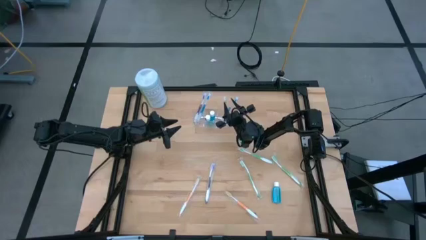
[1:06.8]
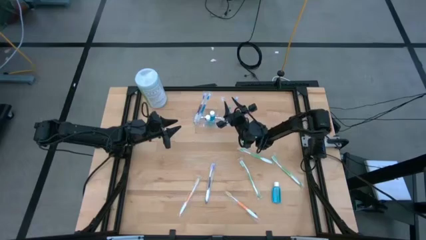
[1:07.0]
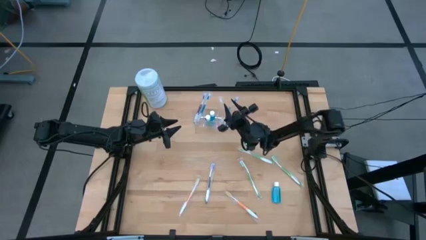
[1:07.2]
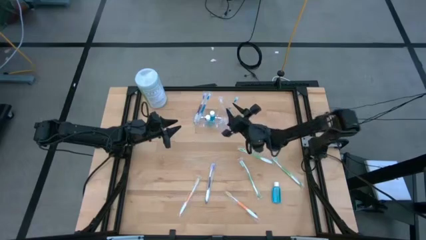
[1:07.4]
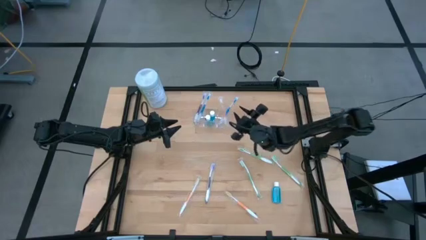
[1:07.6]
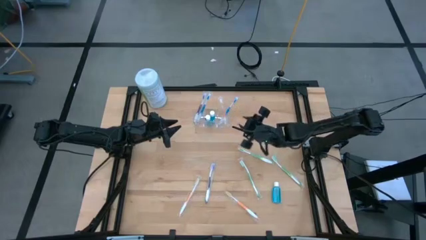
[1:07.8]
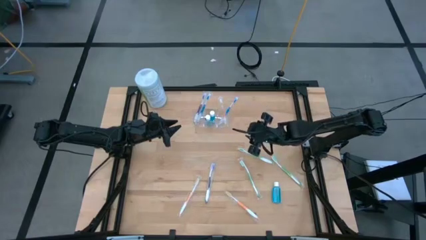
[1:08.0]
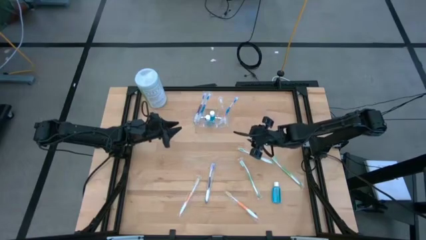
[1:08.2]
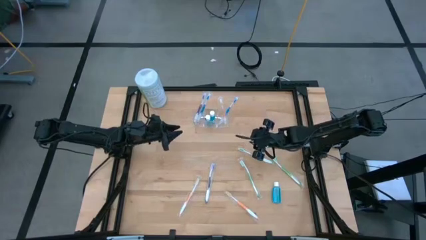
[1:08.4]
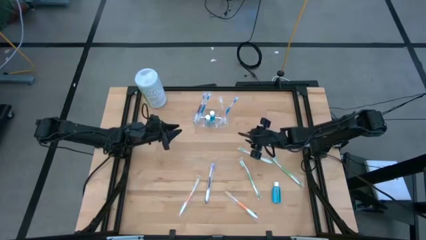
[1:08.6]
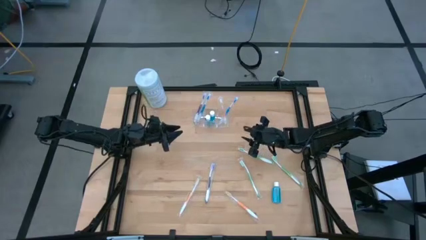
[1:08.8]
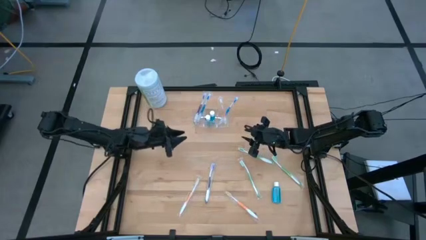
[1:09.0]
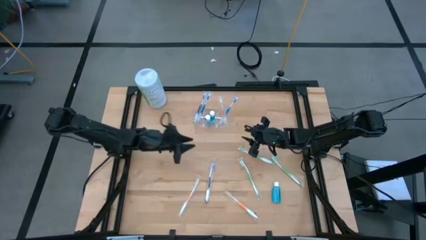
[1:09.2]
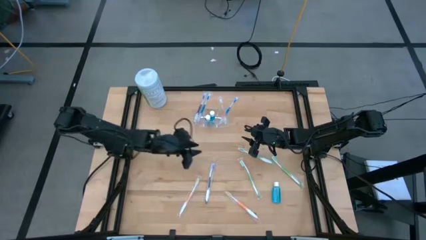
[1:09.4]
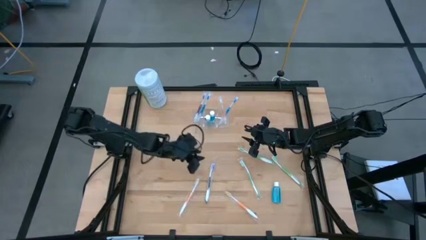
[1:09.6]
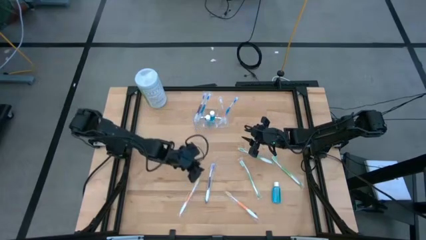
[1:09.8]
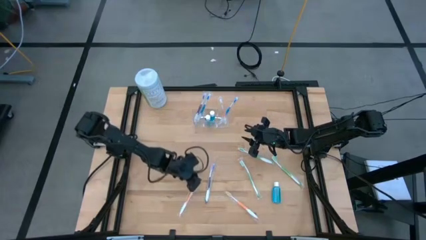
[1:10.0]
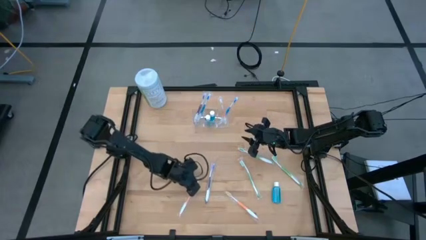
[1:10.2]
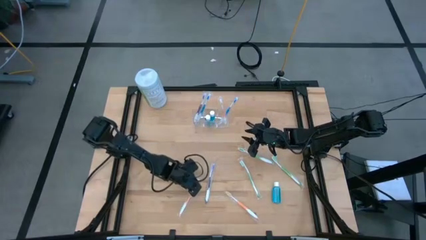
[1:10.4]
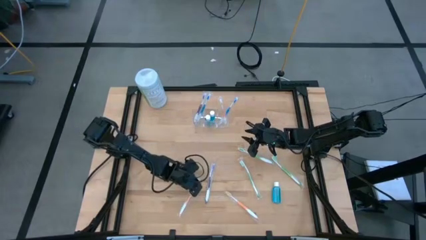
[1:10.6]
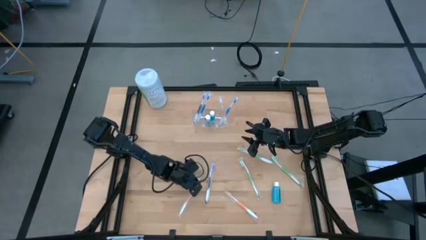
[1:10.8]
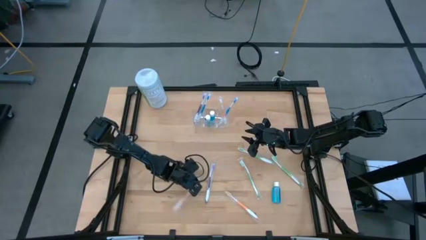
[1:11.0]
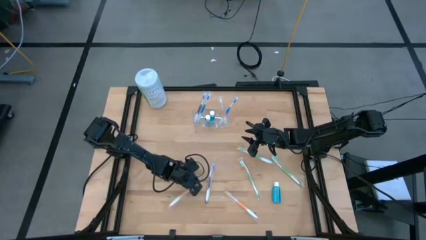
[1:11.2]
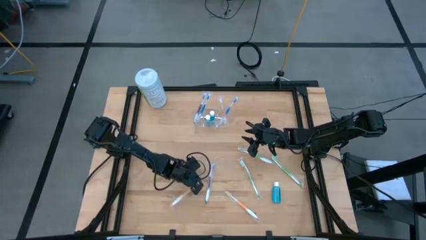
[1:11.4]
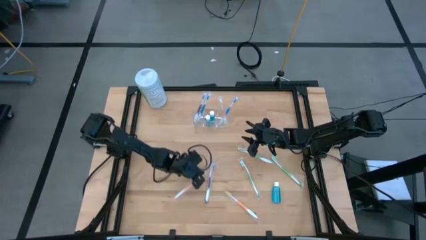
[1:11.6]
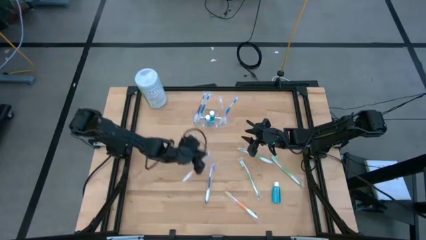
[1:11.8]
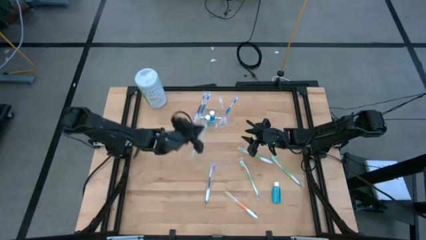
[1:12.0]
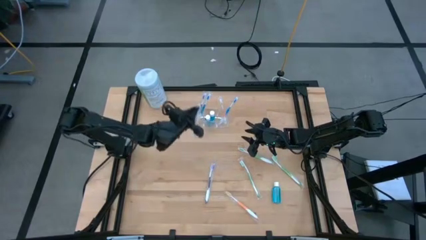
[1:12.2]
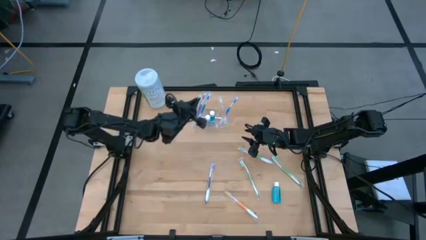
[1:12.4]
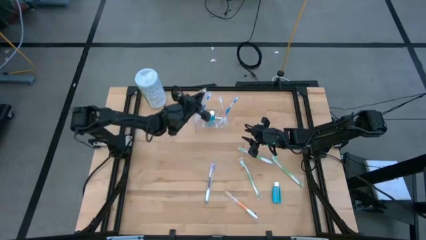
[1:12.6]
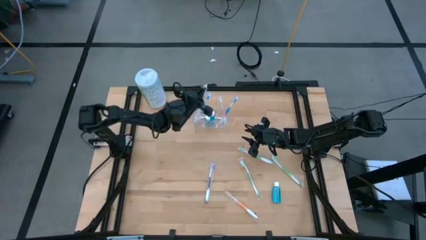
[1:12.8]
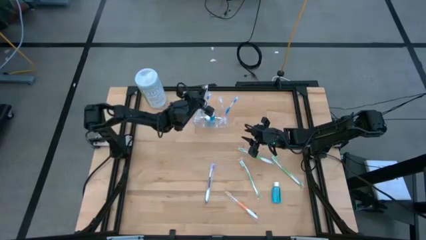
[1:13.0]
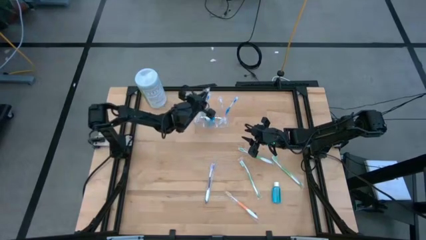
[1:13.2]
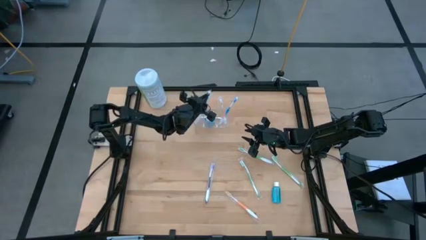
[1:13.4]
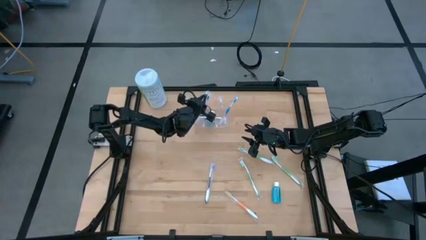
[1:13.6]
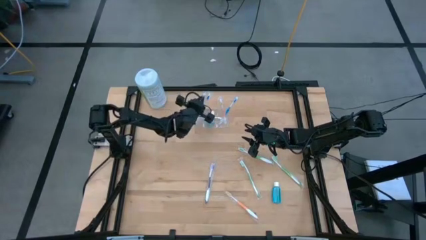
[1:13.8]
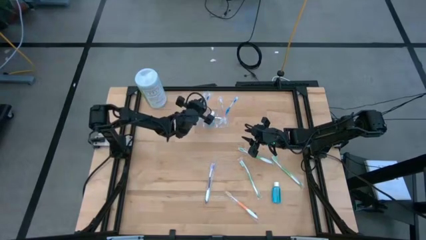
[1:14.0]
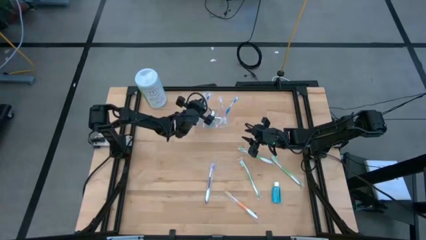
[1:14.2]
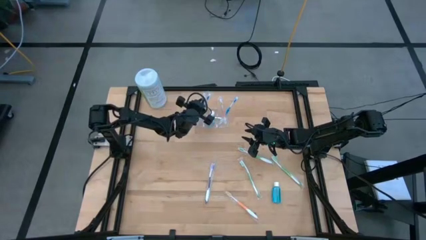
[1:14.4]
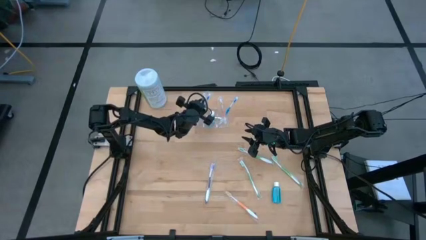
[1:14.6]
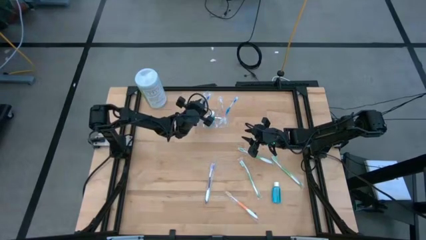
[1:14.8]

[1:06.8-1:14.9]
Task: Pick & Place toothbrushing station
Put the left orange toothbrush into the transparent organizer

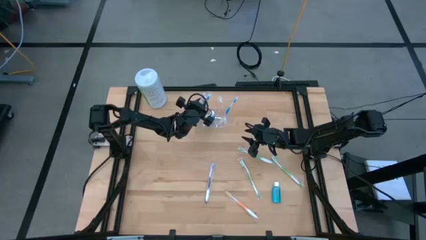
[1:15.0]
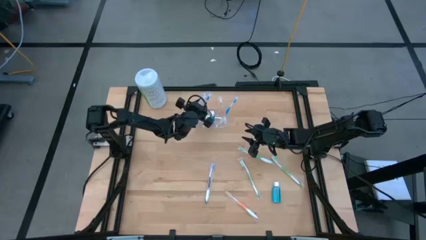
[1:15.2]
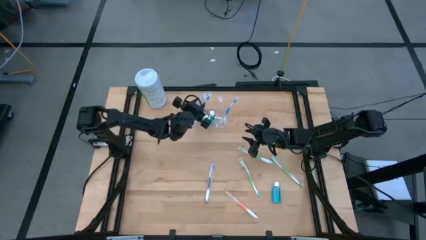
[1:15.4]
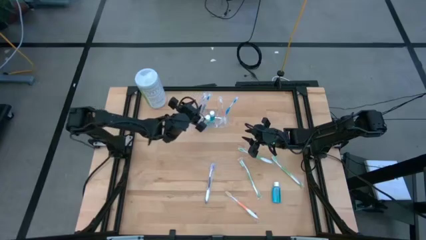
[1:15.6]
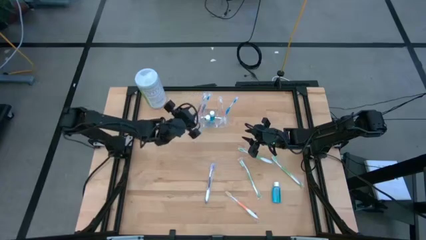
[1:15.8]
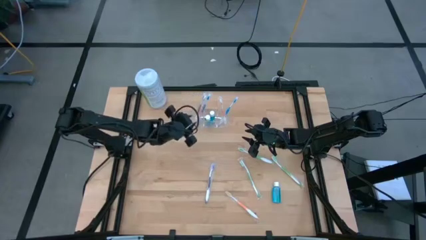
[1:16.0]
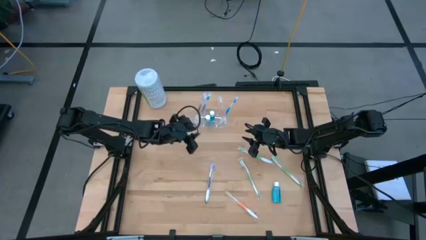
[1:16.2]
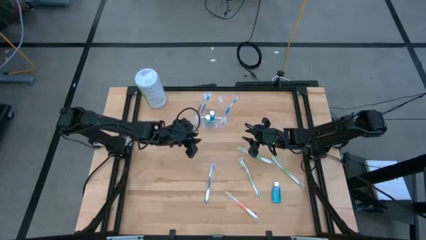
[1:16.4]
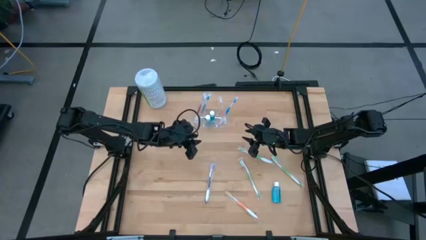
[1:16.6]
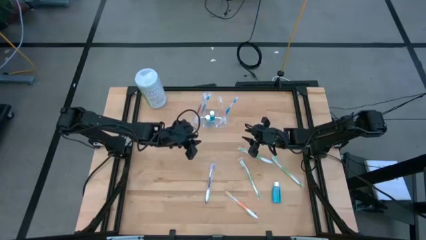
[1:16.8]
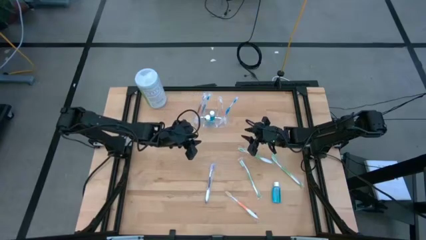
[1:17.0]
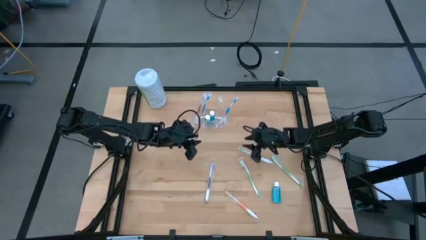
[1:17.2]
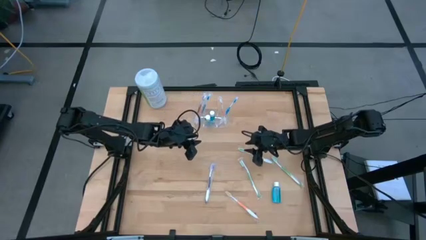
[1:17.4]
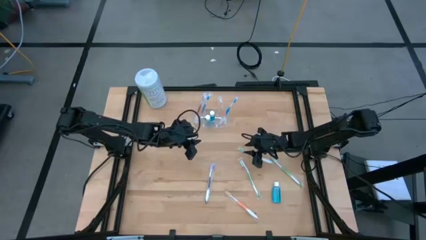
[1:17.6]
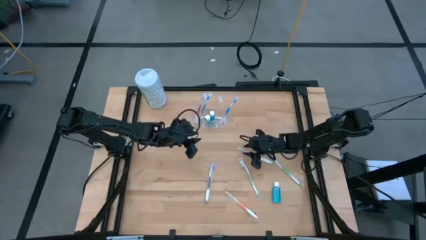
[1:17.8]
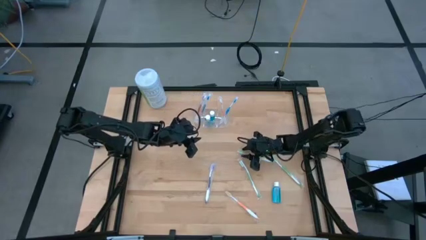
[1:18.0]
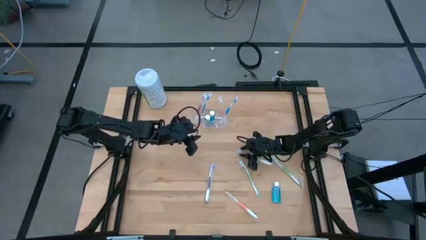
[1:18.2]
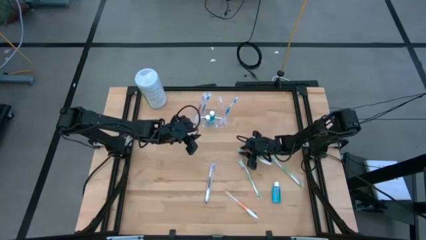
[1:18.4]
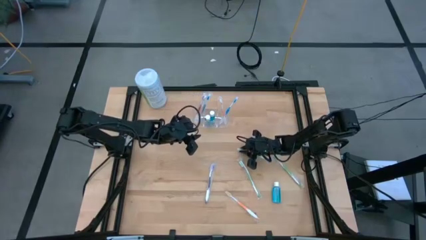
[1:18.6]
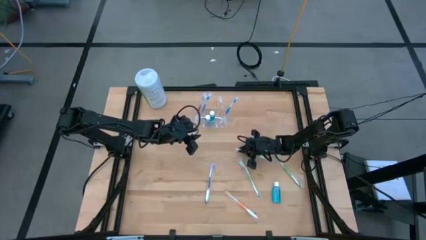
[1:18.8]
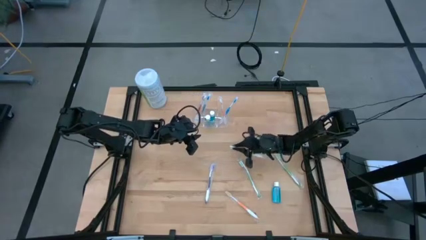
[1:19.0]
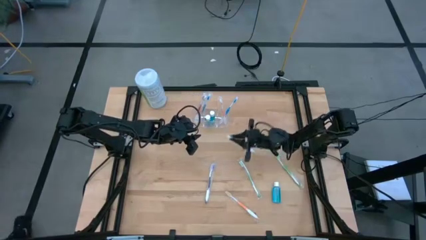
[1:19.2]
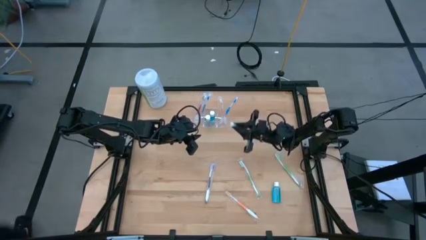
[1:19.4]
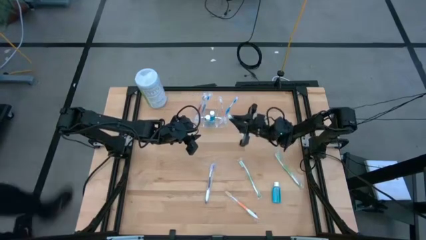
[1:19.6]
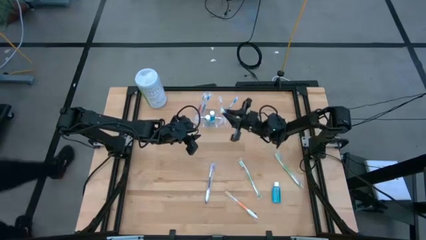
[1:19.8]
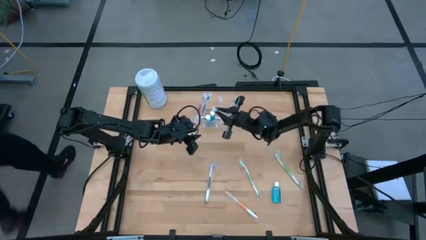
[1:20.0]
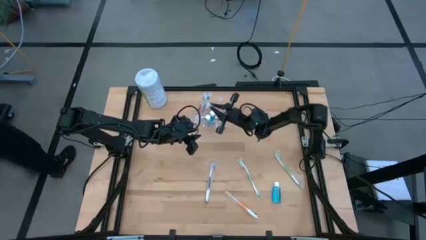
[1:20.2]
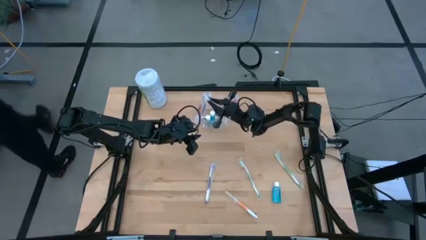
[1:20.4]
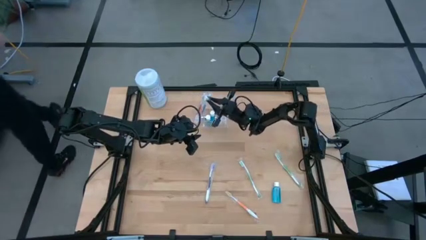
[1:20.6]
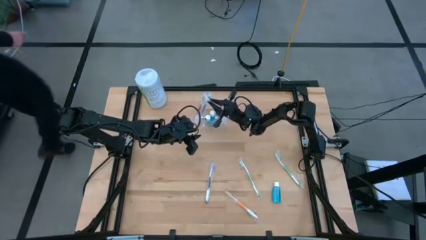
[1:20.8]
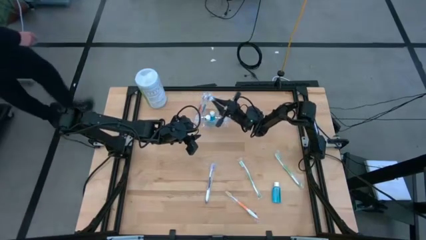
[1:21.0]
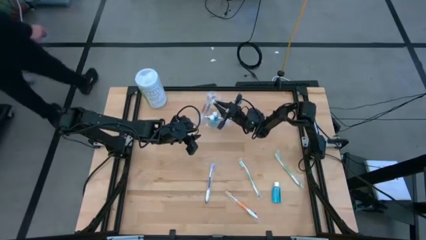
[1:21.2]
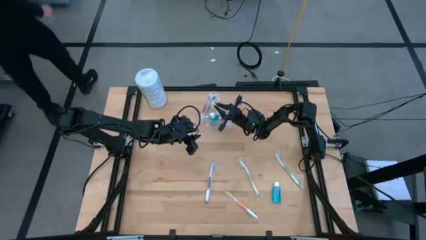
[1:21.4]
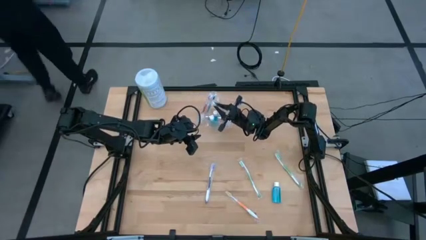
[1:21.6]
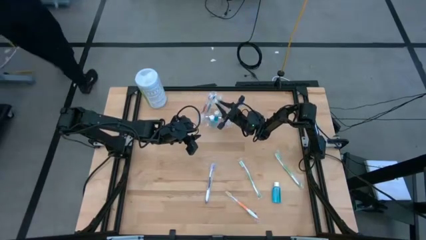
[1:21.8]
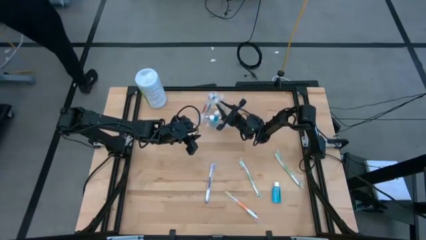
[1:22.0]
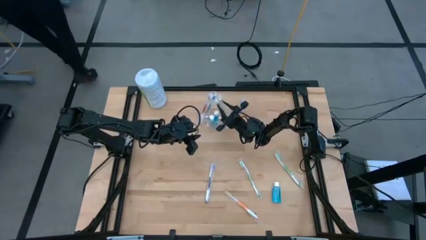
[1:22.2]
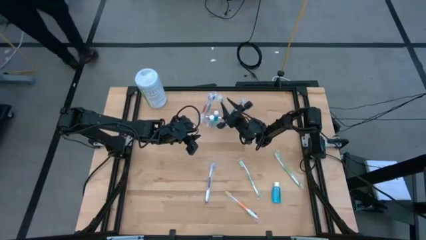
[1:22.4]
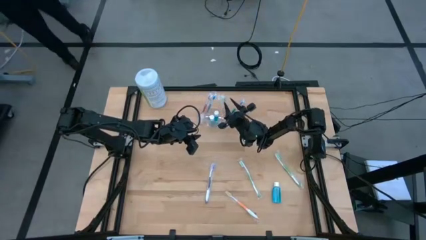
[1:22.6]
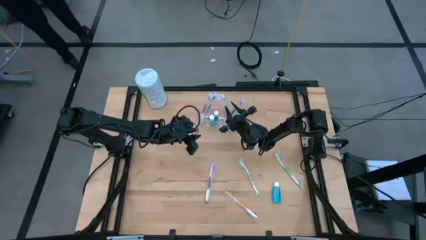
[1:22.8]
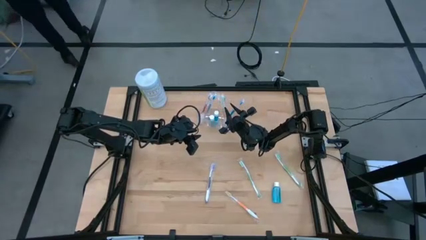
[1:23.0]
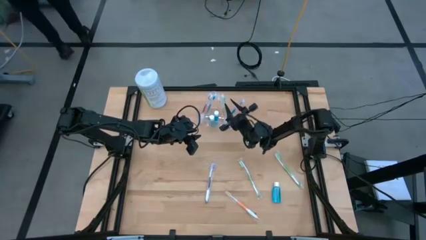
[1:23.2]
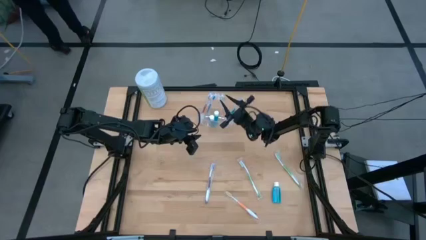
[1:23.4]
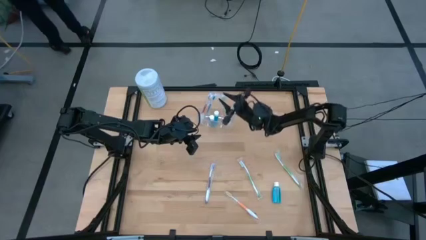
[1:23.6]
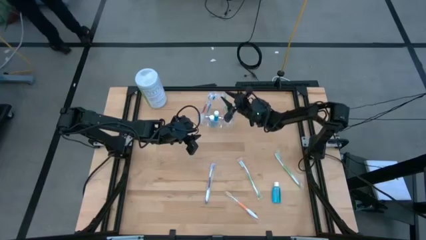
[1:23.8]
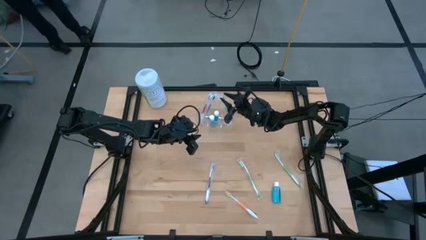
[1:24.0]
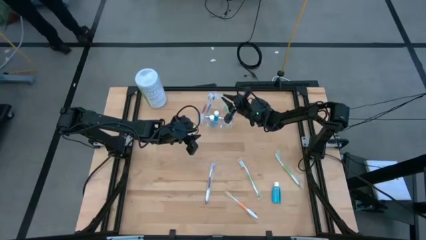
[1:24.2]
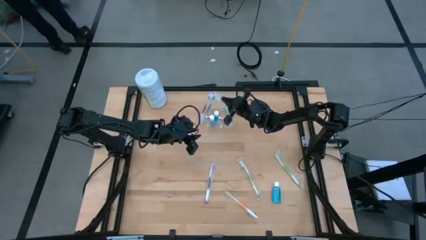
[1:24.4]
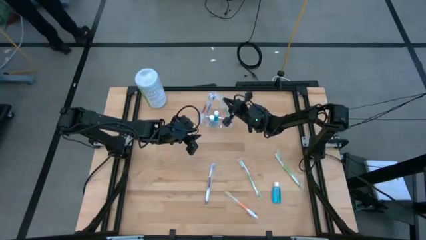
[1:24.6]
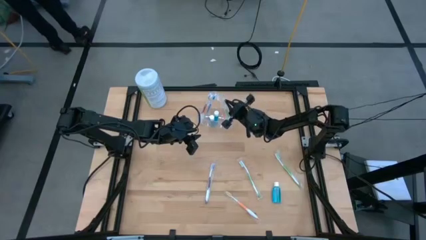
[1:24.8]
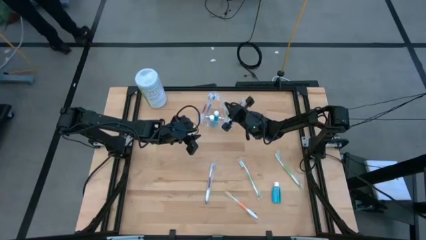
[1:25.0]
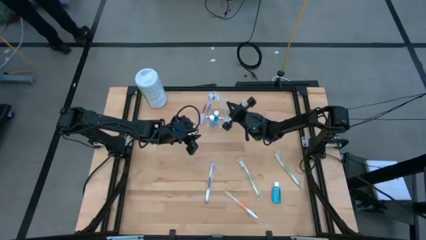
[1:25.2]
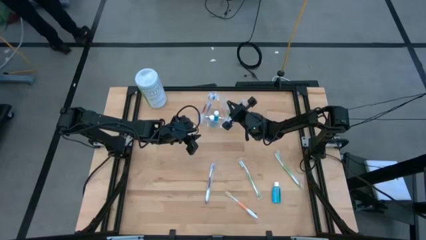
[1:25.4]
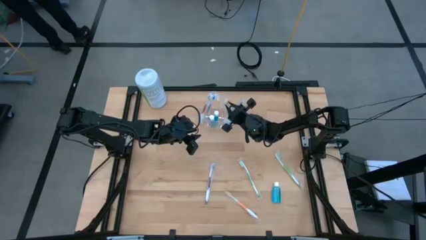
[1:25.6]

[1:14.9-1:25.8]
Put the top green toothbrush into the transparent organizer
